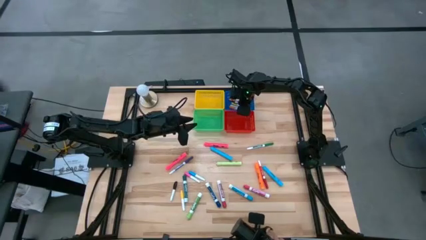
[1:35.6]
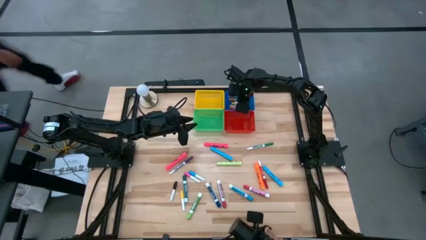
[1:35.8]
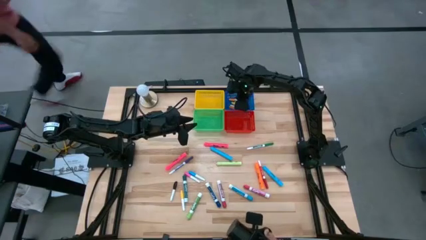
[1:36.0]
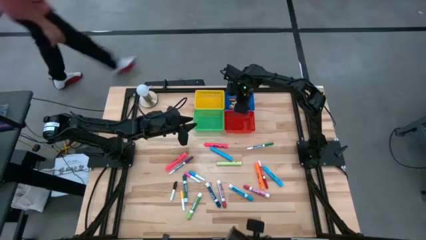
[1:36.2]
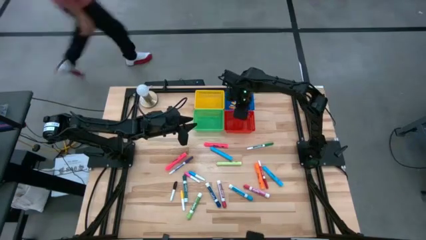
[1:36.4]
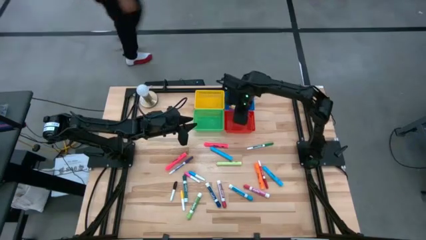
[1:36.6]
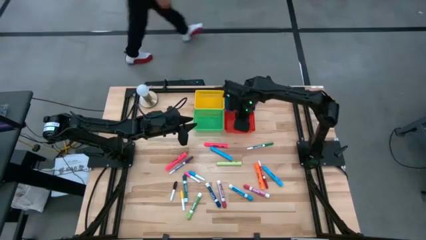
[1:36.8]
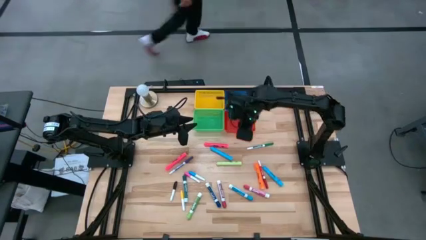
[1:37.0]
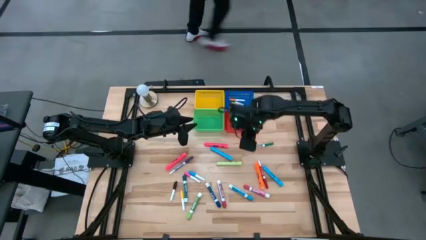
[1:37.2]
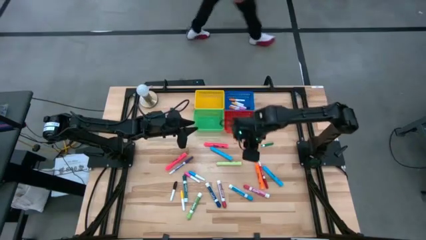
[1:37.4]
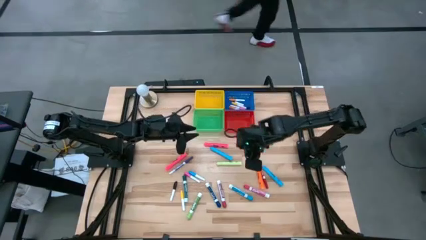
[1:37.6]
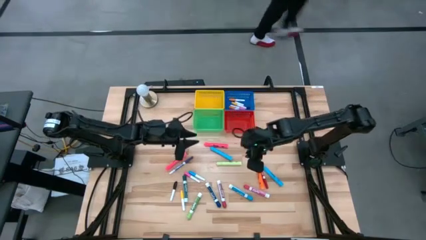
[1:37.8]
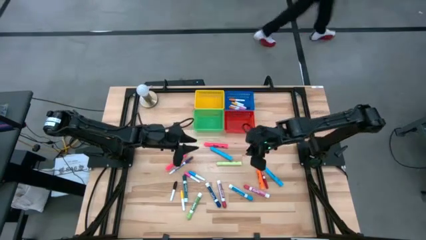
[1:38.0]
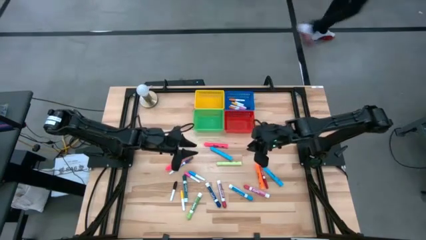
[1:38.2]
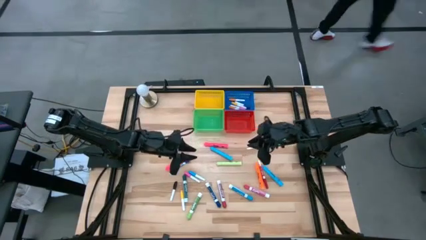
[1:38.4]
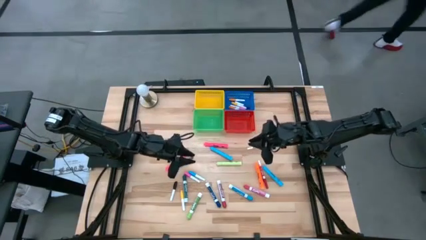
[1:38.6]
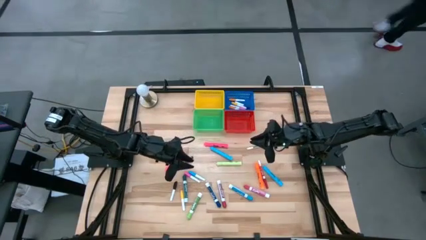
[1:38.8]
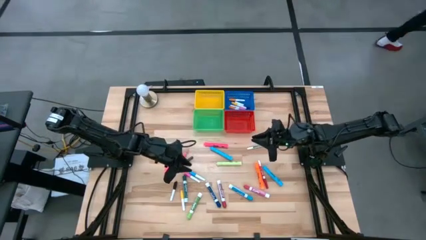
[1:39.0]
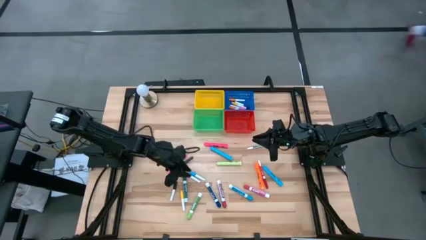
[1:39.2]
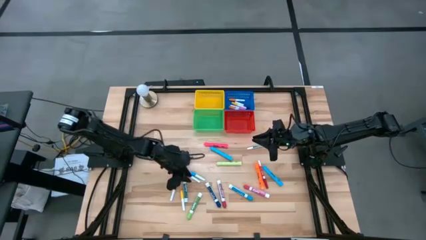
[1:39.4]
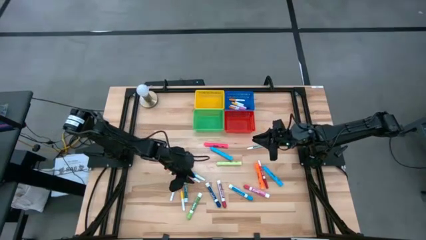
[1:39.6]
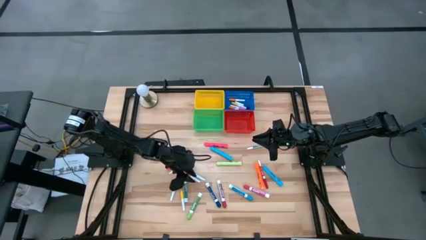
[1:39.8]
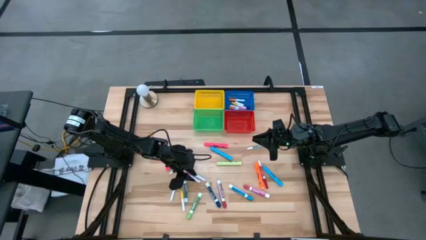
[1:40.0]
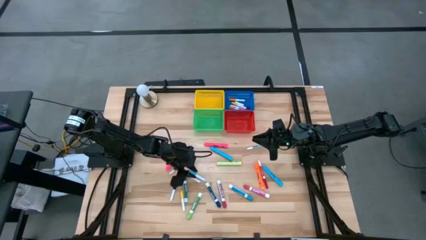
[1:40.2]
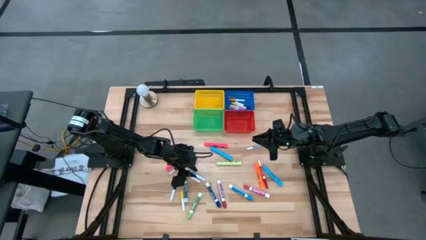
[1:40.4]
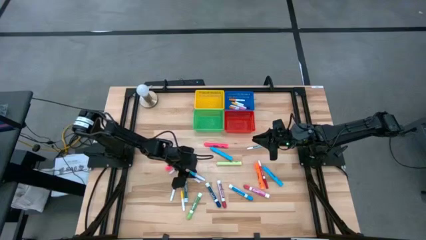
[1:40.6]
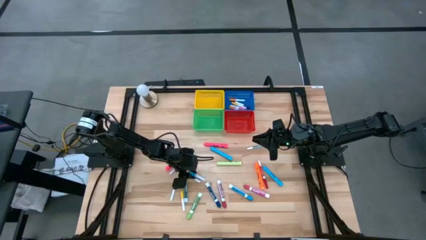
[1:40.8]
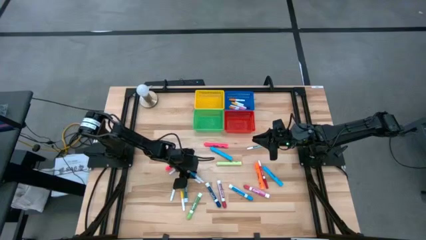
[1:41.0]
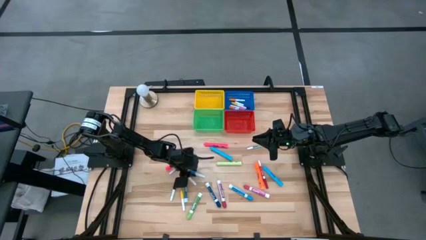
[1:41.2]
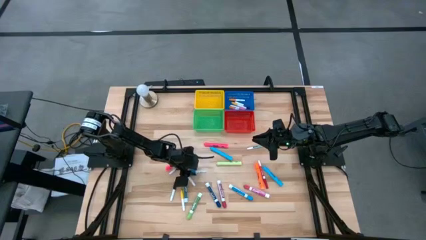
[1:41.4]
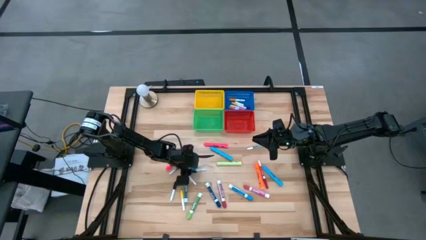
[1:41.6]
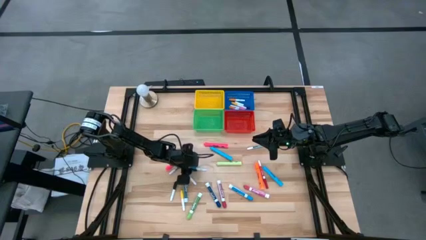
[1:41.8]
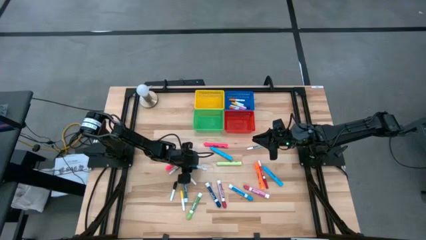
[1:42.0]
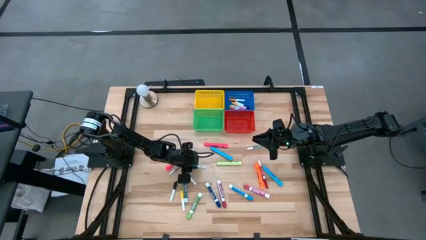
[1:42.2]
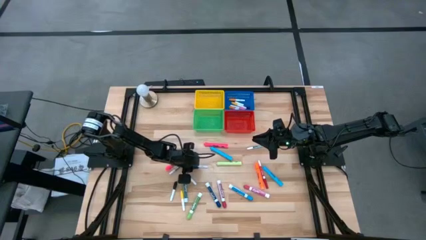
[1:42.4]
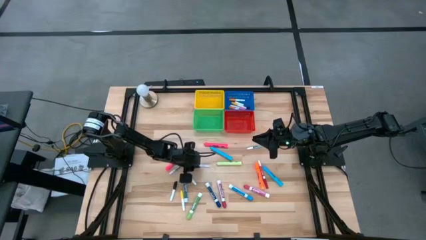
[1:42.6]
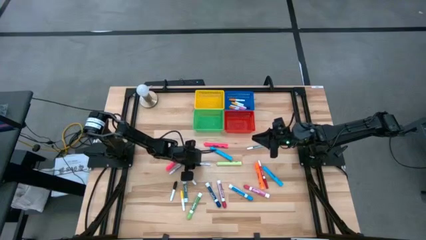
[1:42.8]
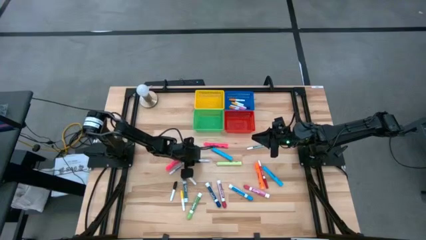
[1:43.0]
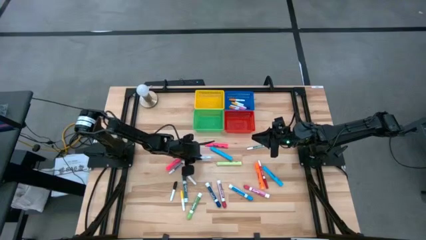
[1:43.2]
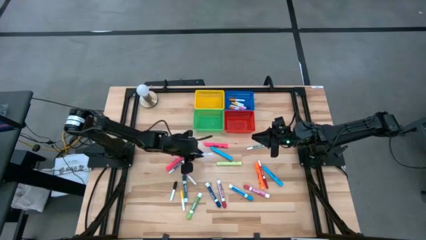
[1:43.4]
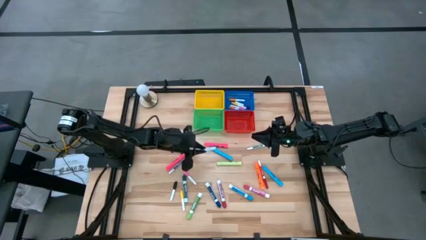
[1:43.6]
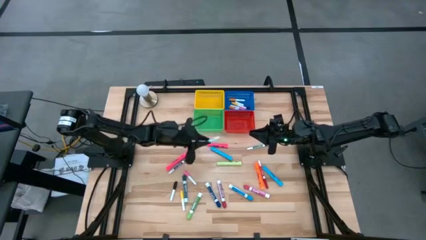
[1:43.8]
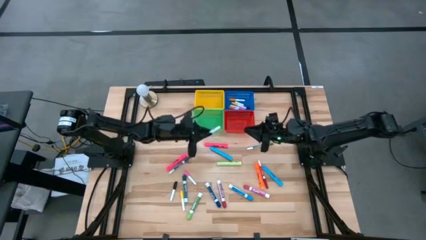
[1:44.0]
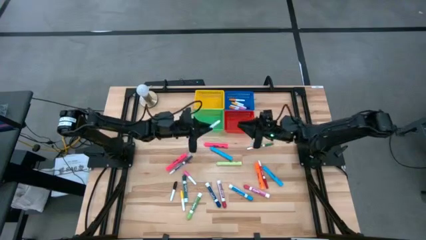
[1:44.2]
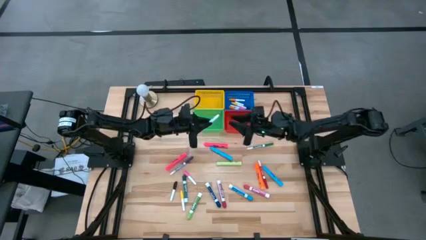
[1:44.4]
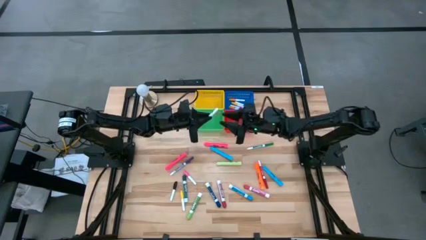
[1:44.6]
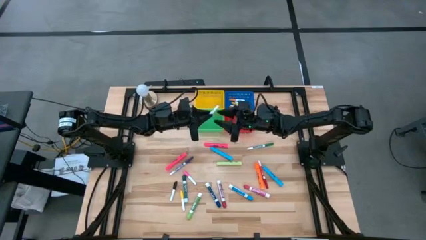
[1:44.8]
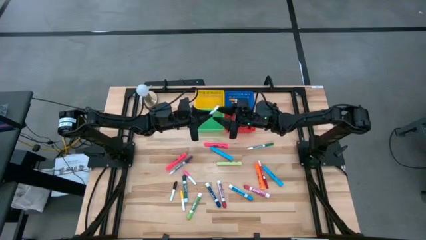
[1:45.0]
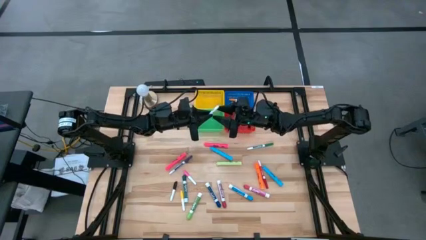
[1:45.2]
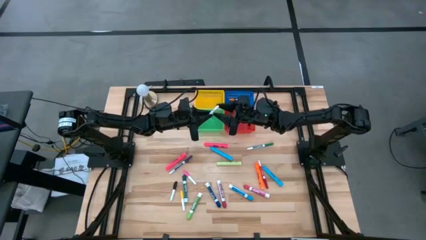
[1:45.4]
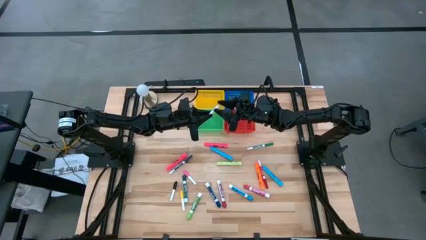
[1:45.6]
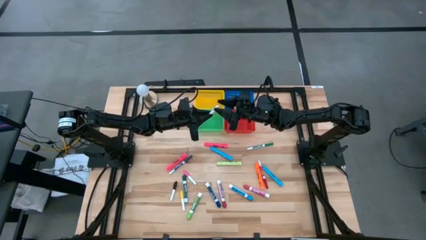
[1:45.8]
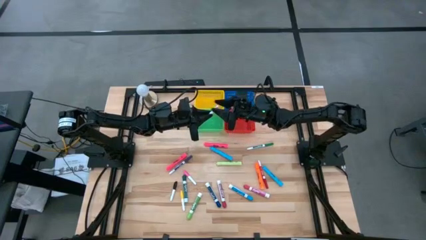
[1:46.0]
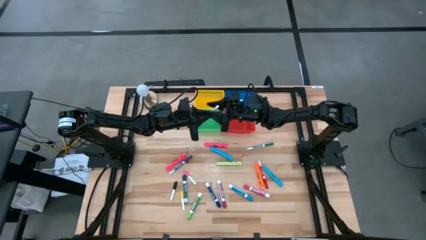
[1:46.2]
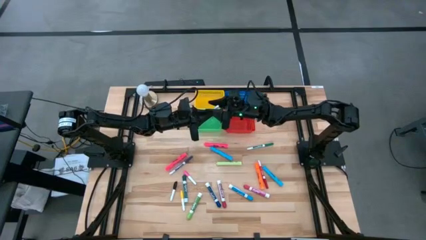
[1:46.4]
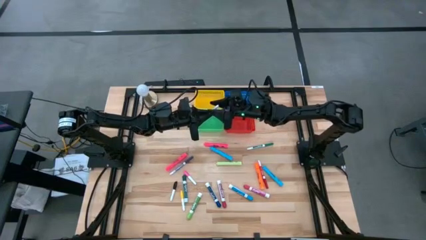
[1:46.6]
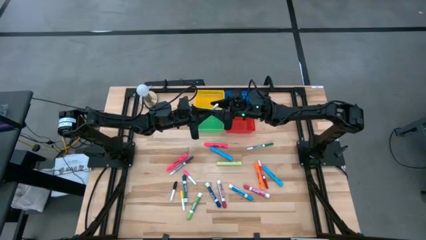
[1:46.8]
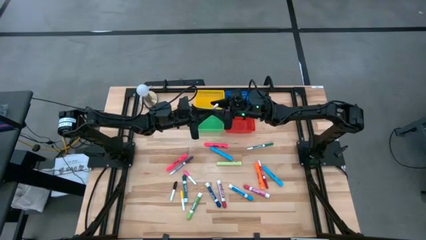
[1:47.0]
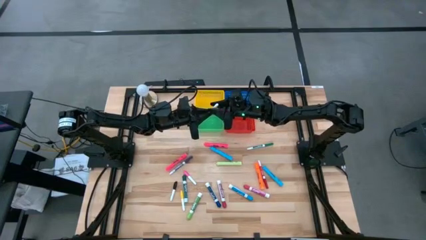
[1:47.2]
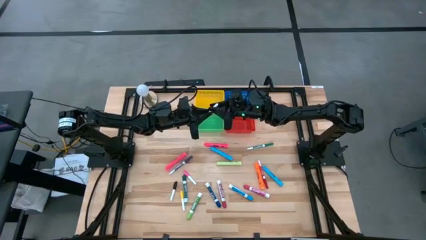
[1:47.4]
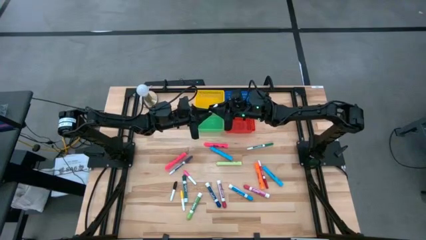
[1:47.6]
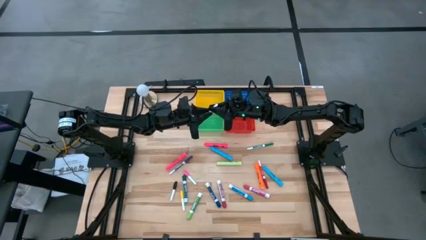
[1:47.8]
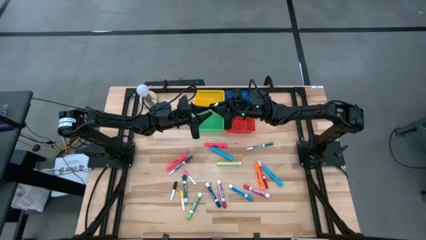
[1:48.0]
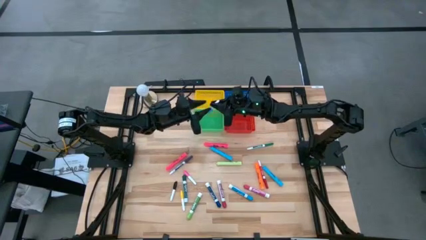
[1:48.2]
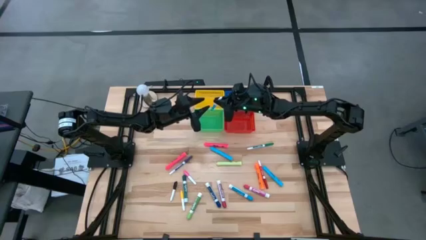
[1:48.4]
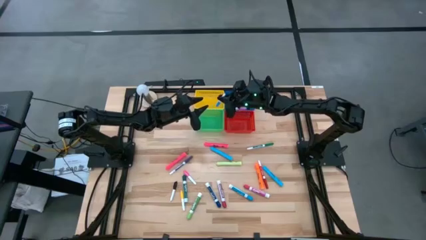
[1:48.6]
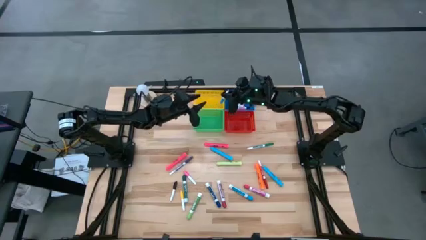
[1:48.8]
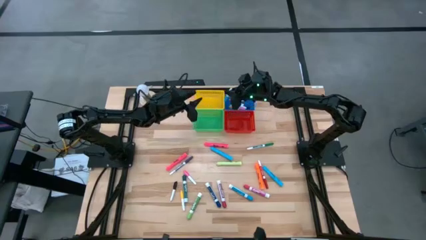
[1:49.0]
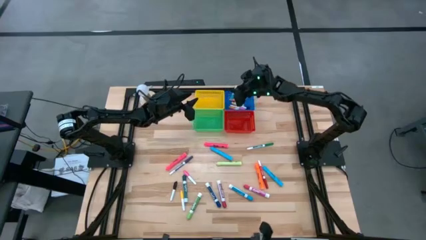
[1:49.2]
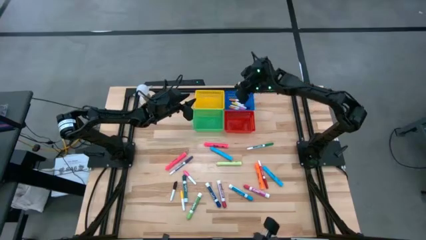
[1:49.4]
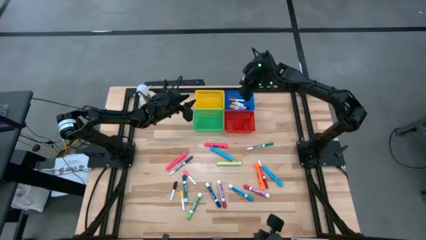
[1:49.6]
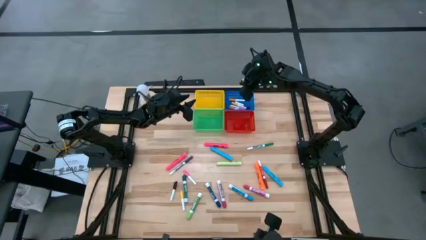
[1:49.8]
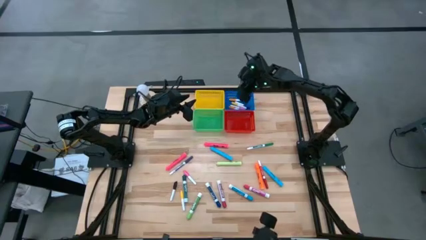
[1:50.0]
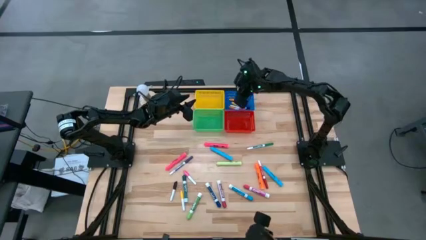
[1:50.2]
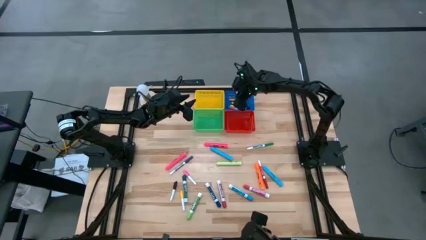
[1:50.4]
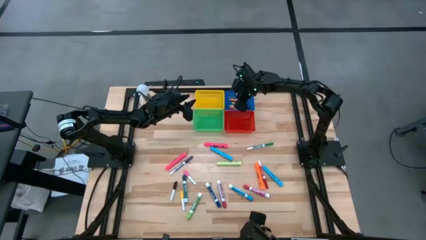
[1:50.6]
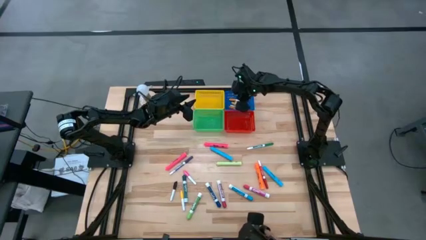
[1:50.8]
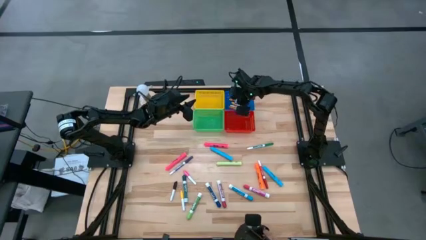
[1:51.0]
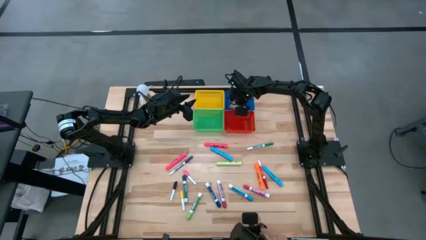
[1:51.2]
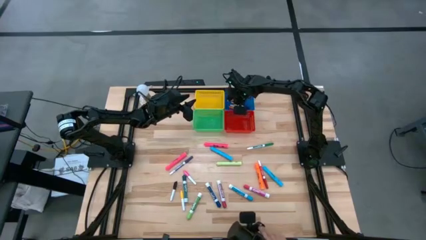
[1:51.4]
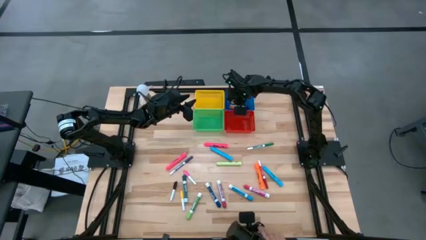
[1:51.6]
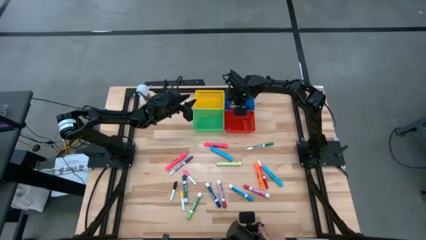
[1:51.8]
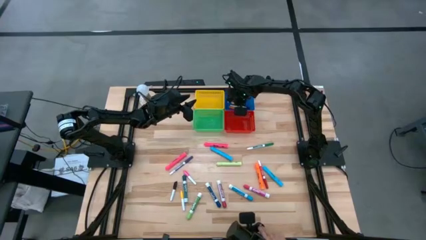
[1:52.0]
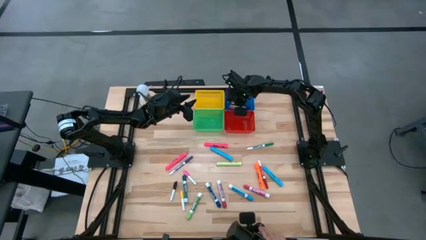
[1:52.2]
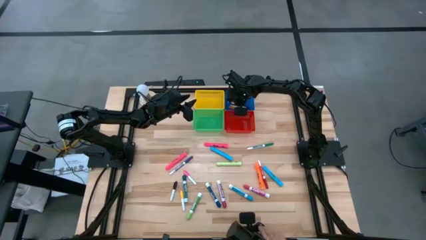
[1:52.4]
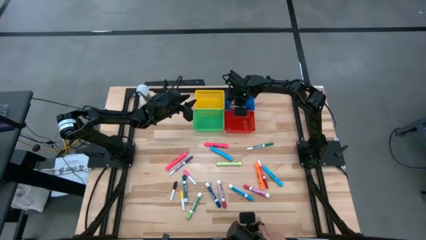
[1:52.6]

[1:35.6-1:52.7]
Task: Pick & Place Markers
Put the small blue highlighter pen into the blue bin
